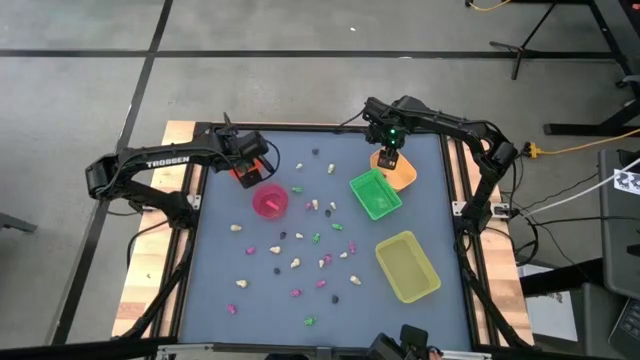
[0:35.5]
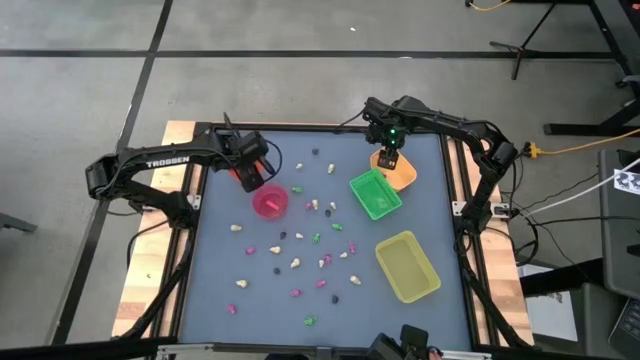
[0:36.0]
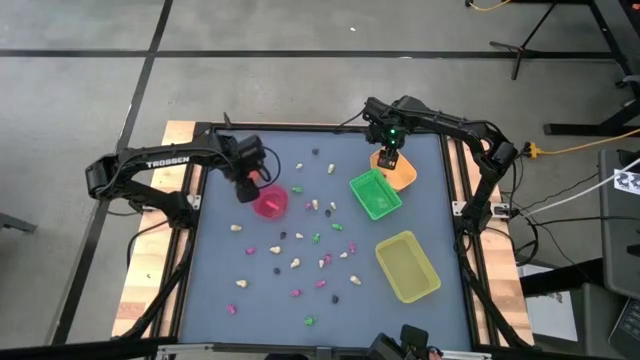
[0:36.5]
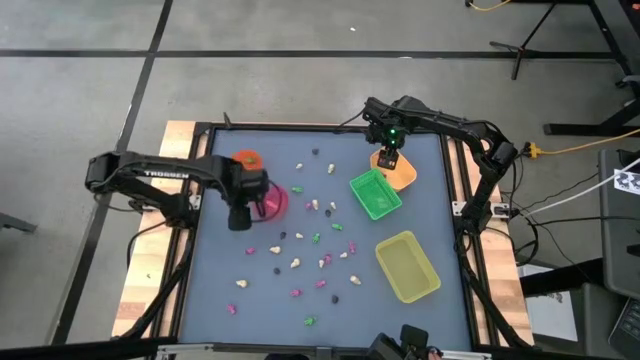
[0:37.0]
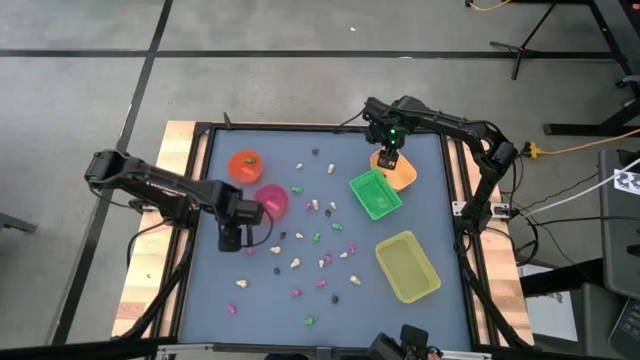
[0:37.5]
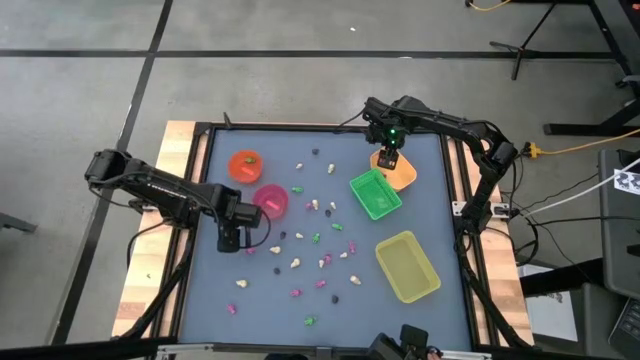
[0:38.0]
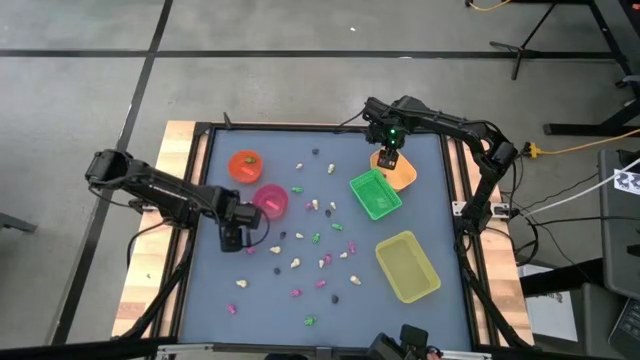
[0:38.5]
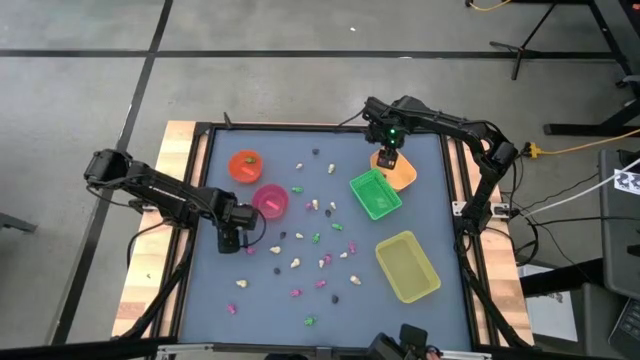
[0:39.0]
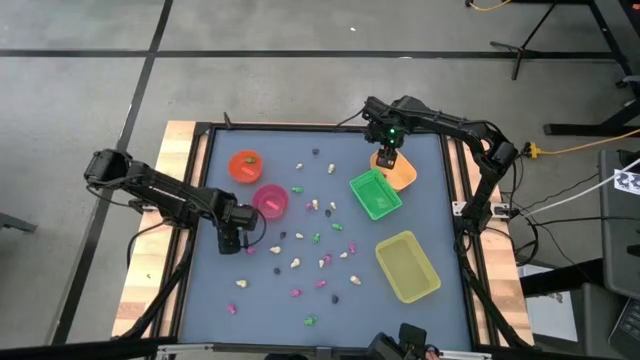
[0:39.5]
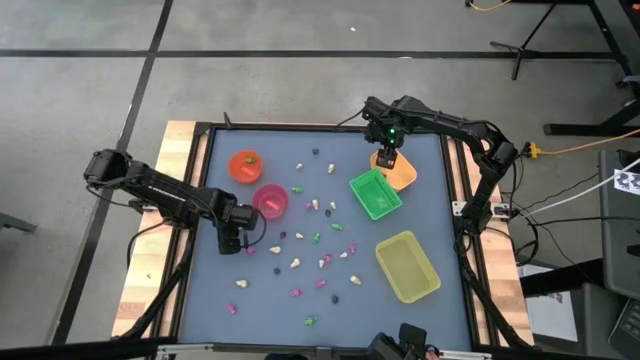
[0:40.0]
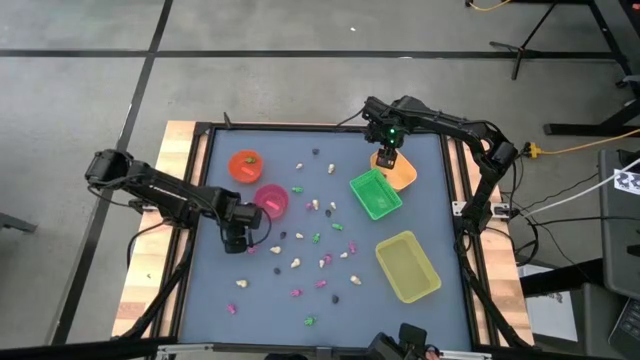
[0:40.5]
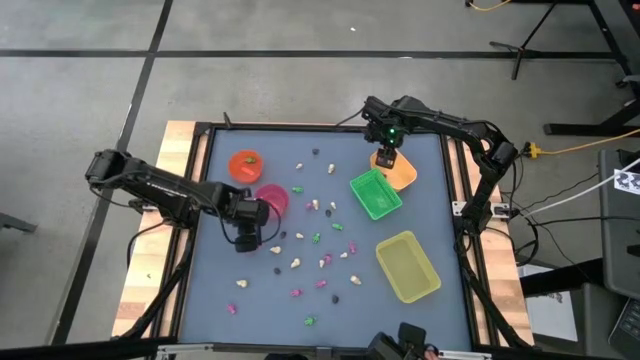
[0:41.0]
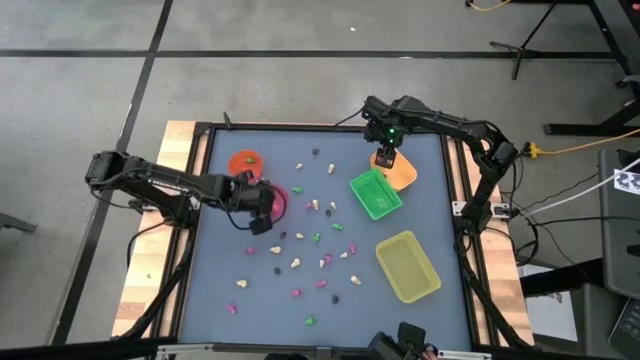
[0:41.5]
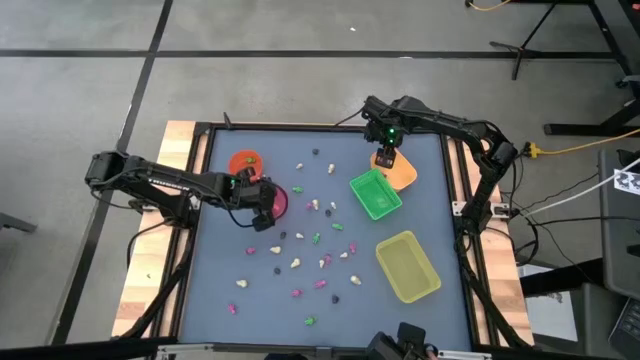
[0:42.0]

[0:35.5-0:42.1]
Task: Sort Halloween decoration
Put the white skull toy into the pink bin

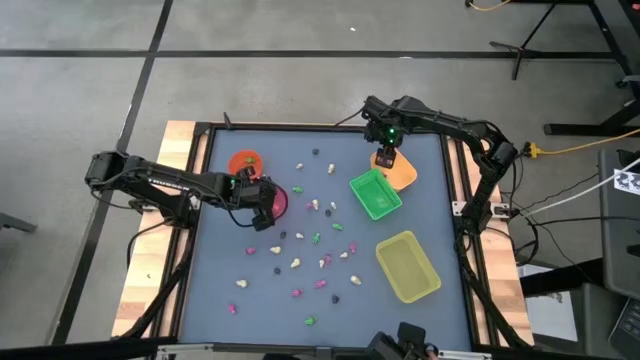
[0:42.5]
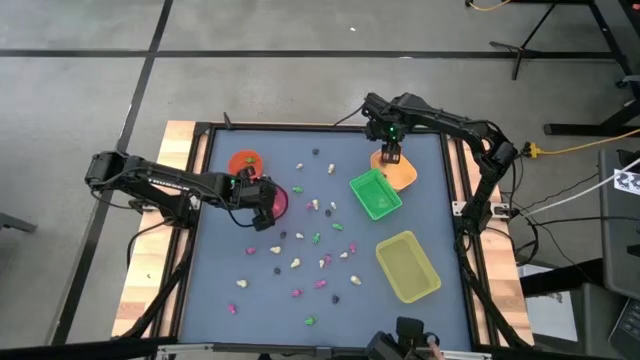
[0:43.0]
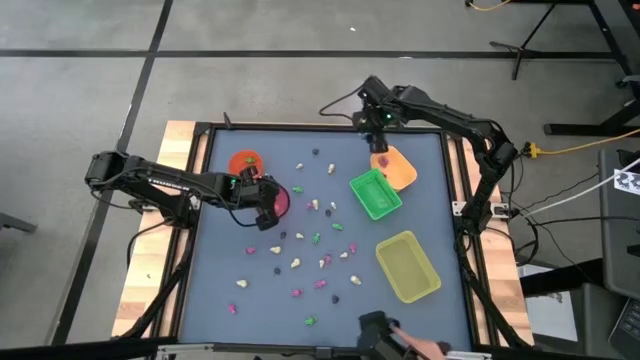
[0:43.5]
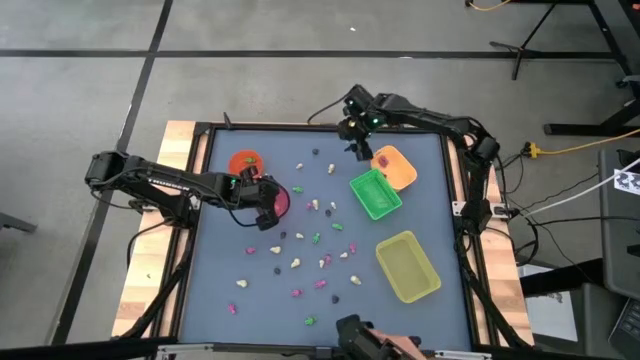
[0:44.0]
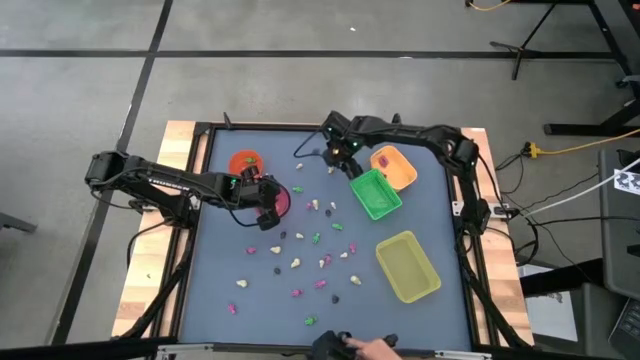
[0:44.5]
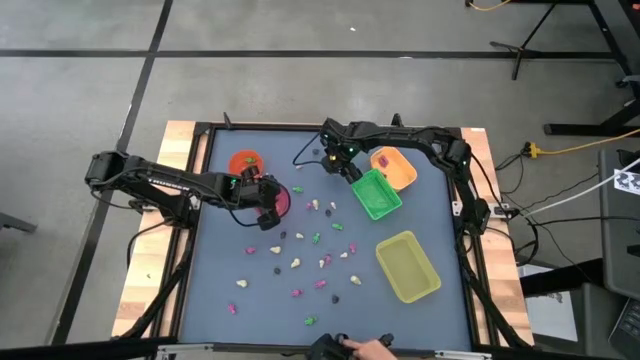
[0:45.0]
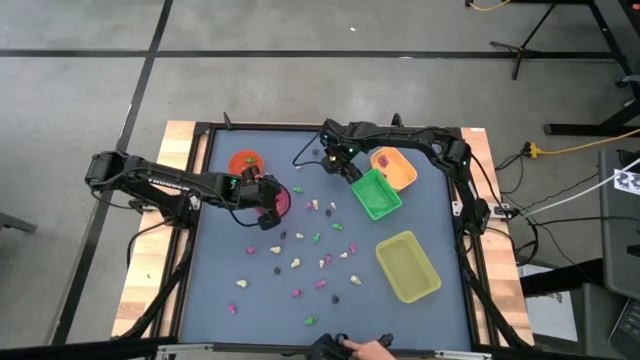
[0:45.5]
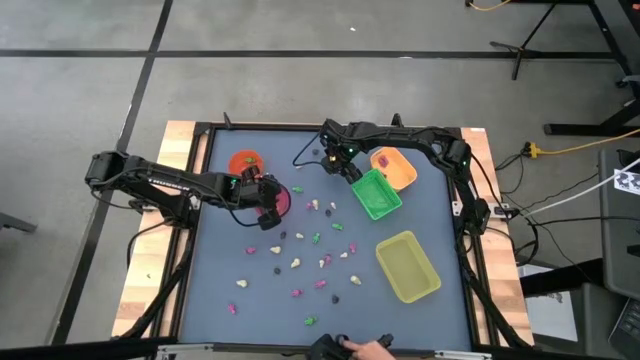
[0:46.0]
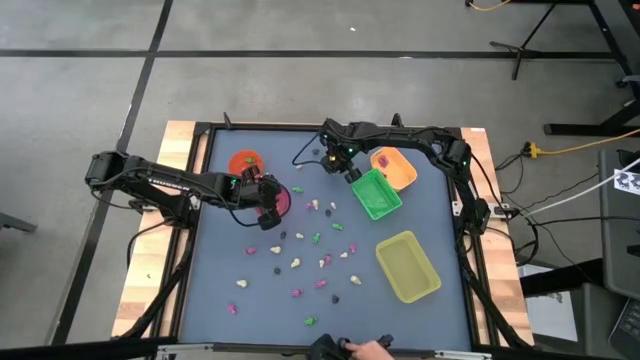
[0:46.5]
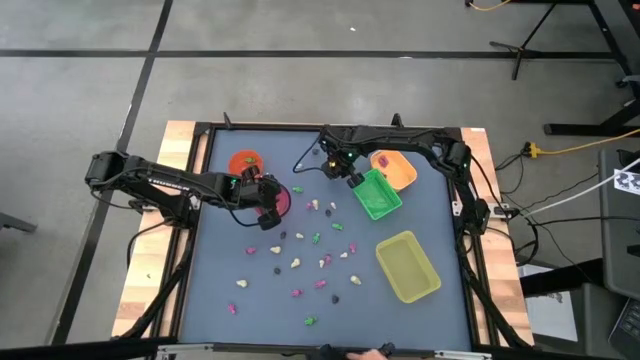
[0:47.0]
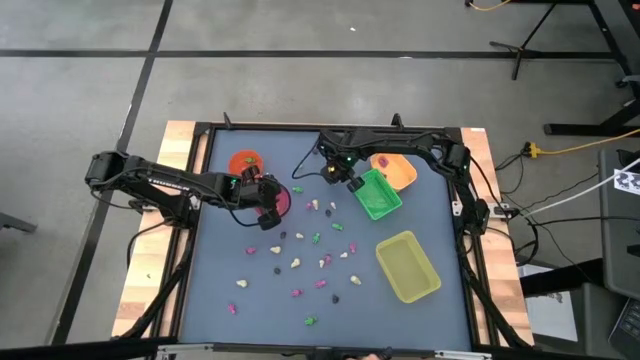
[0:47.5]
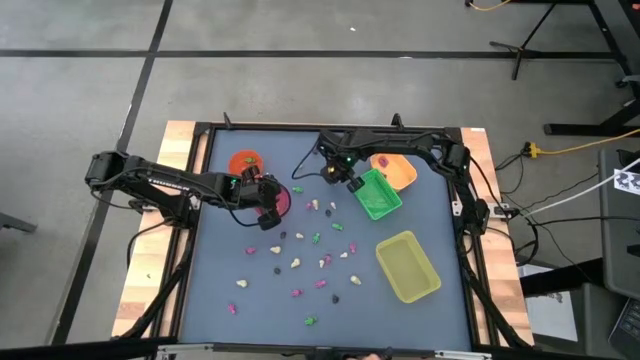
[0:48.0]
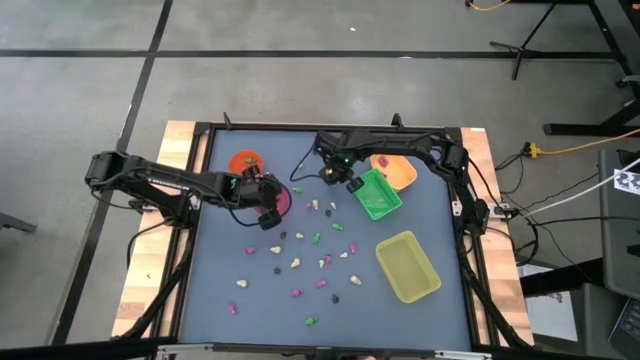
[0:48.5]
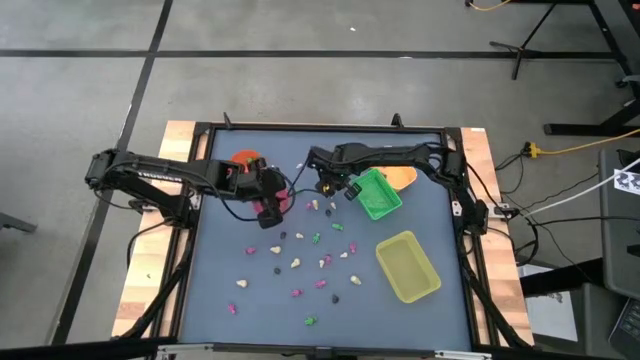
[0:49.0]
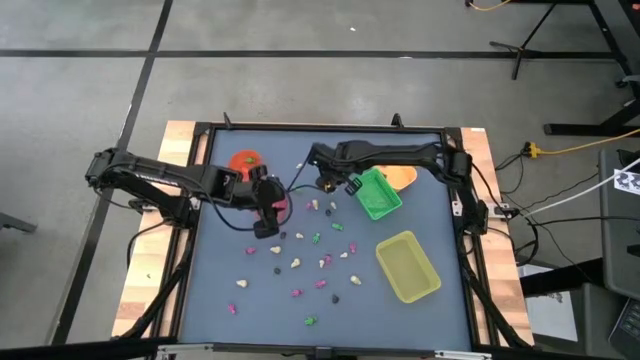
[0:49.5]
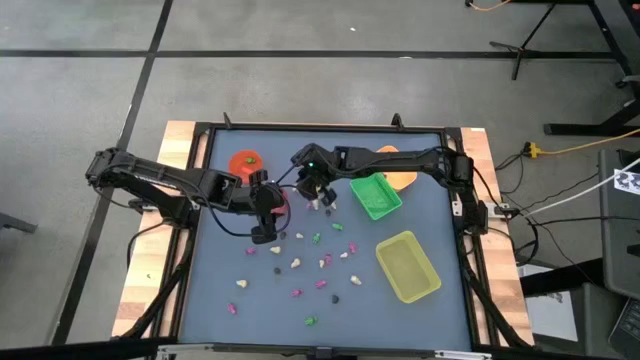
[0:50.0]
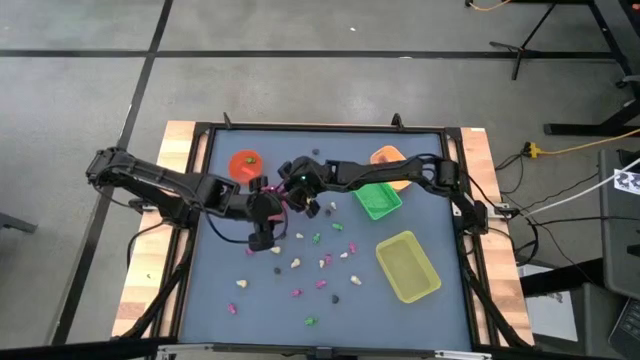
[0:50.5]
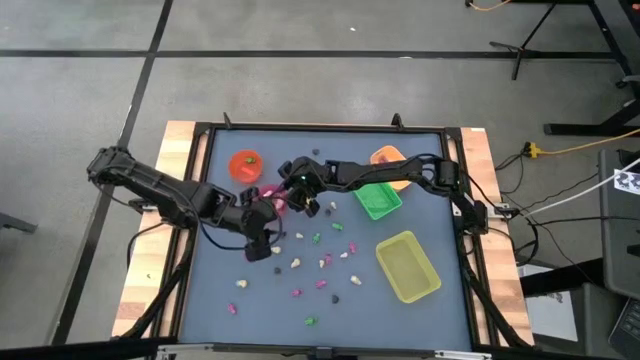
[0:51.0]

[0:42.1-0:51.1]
Put the white skull toy into the pink bin

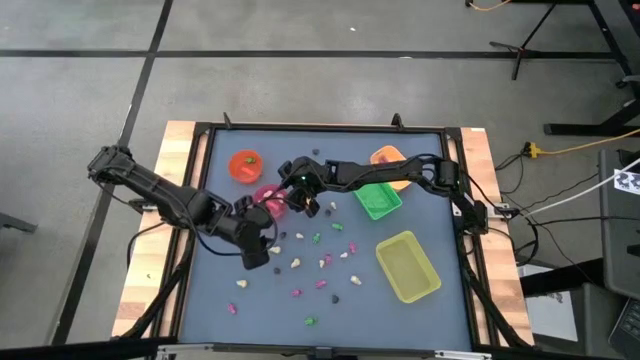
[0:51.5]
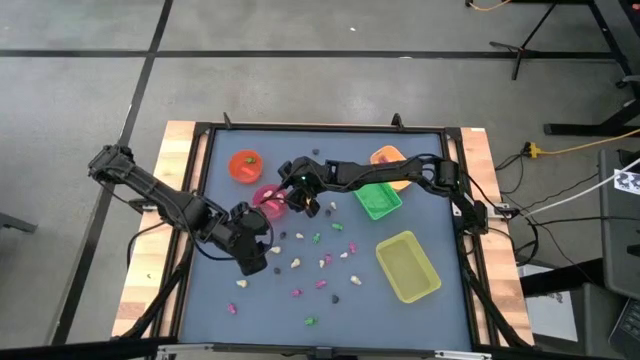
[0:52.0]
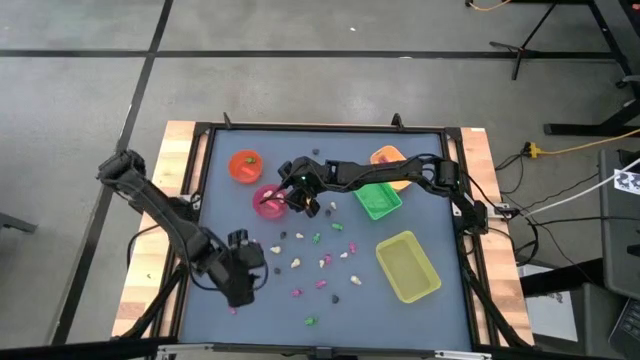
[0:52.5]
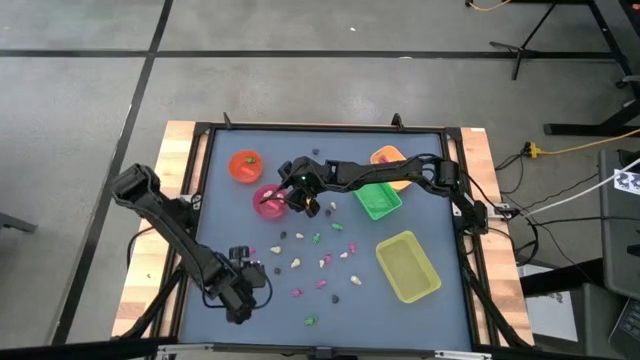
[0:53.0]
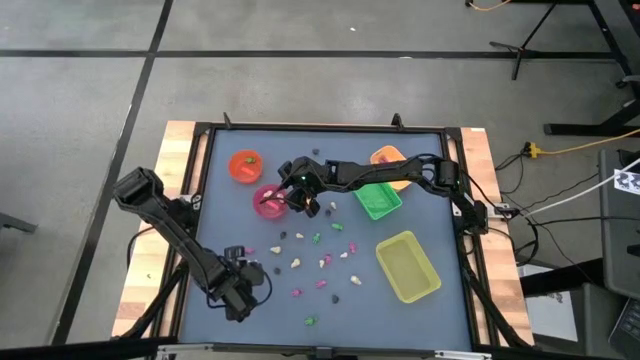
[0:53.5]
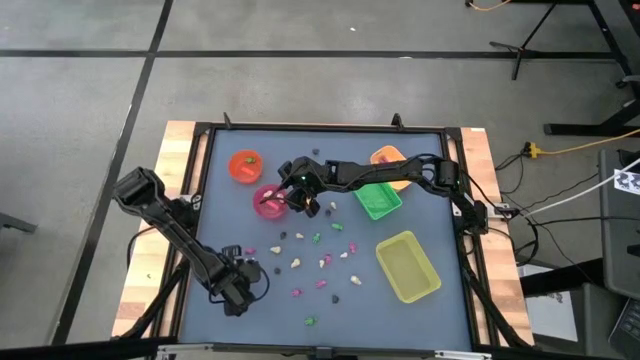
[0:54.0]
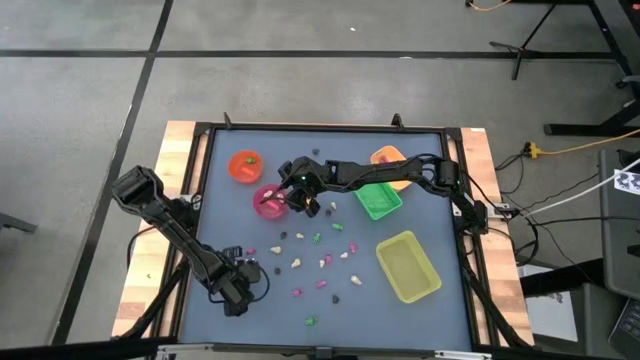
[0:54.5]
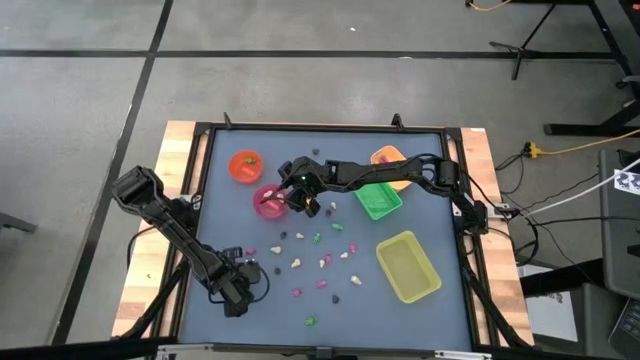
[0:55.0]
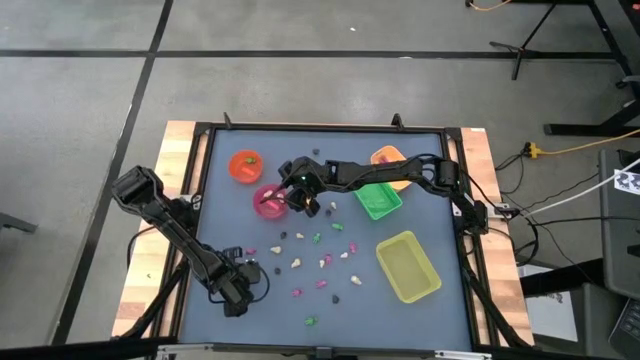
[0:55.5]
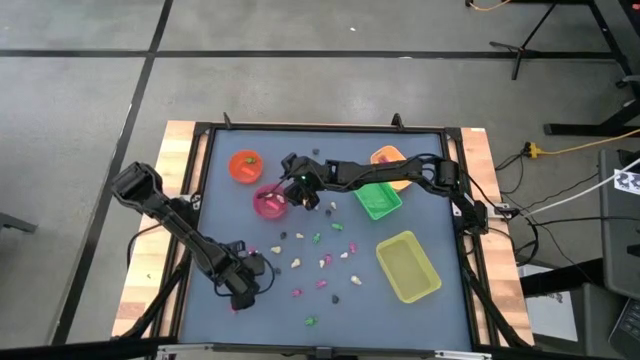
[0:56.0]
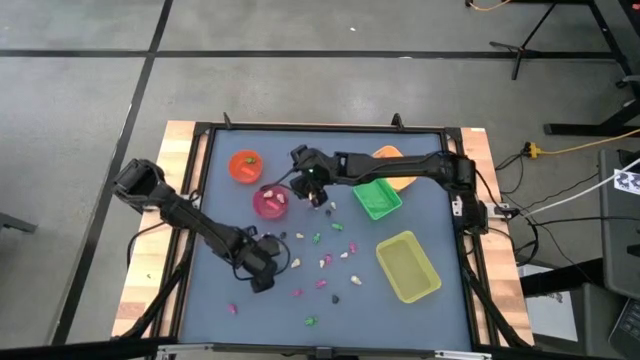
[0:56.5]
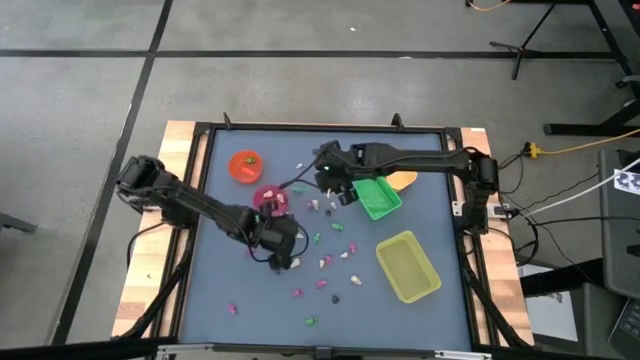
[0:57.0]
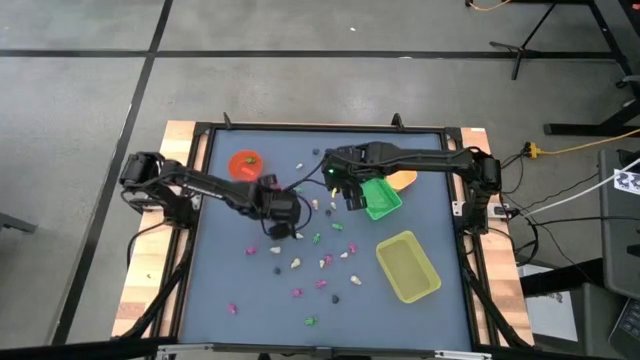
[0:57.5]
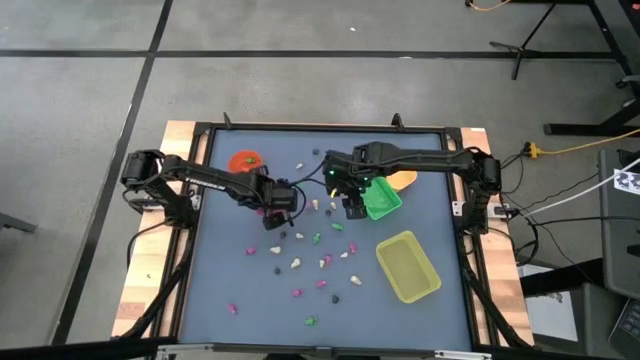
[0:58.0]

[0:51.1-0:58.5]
Put the white skull toy into the pink bin
